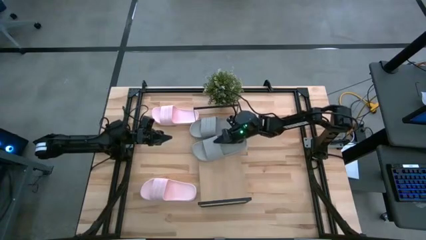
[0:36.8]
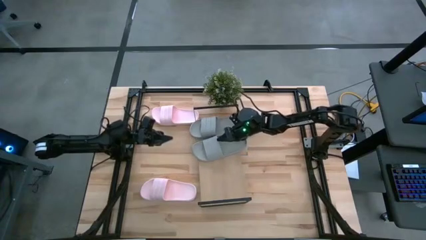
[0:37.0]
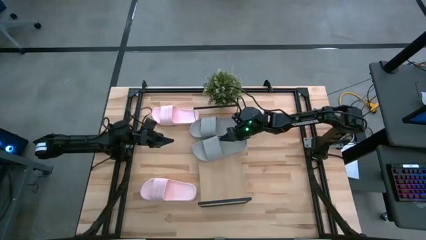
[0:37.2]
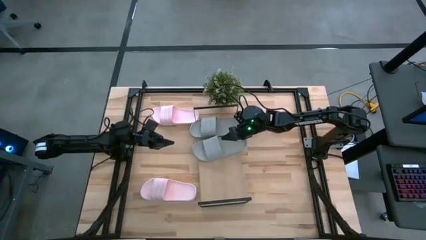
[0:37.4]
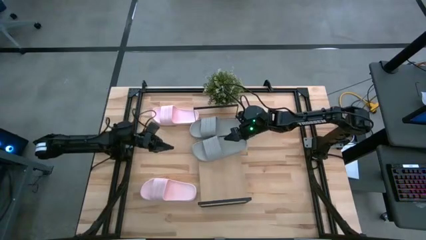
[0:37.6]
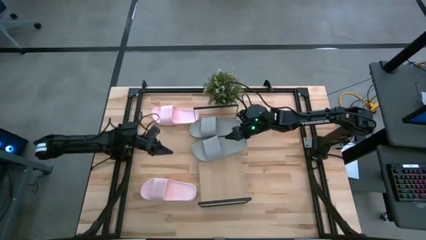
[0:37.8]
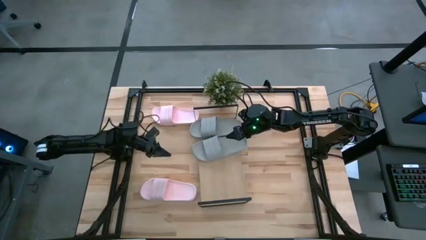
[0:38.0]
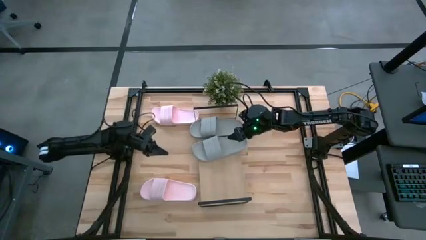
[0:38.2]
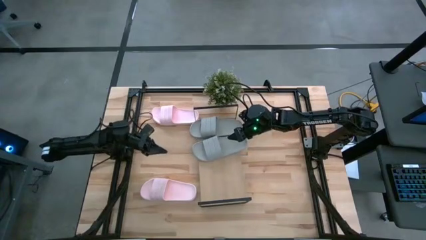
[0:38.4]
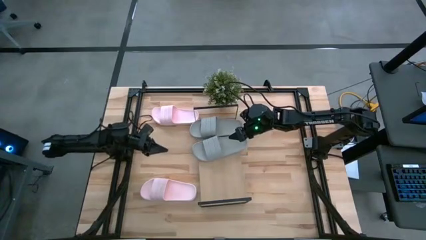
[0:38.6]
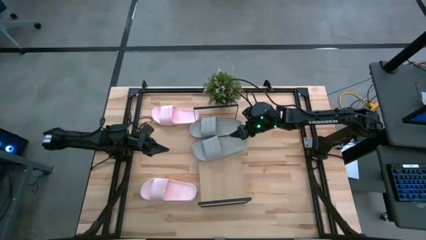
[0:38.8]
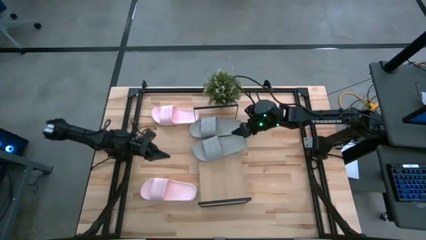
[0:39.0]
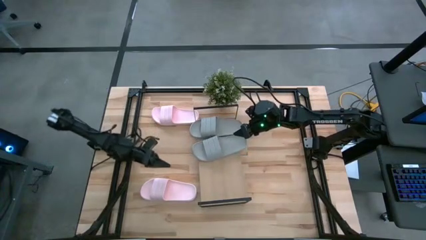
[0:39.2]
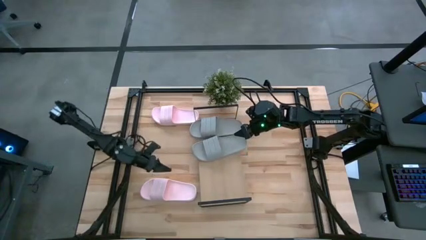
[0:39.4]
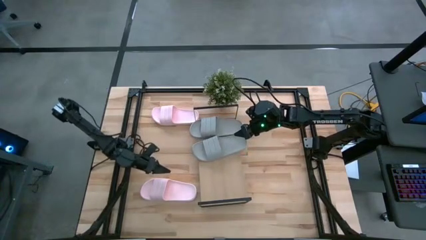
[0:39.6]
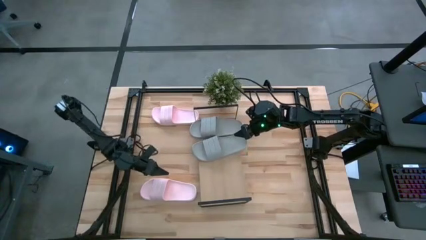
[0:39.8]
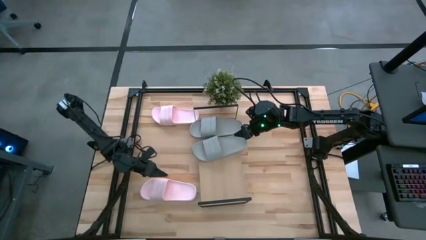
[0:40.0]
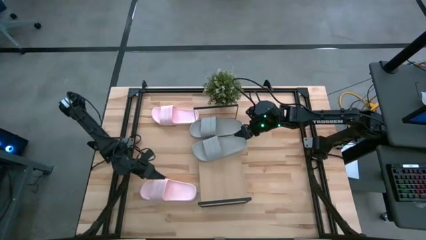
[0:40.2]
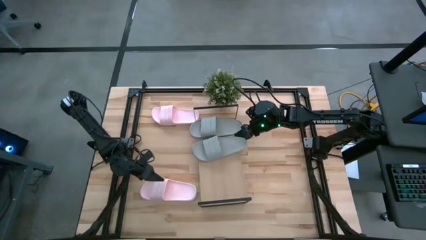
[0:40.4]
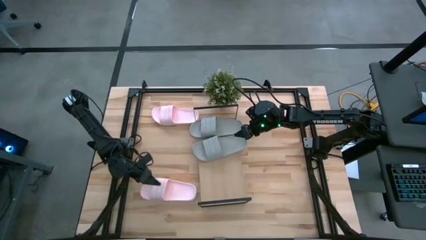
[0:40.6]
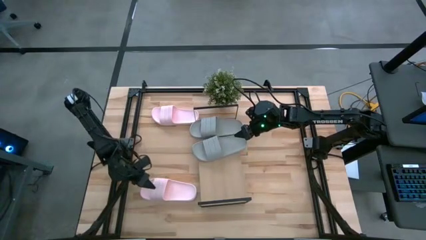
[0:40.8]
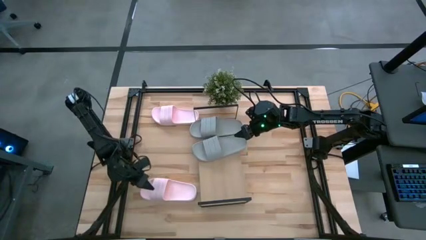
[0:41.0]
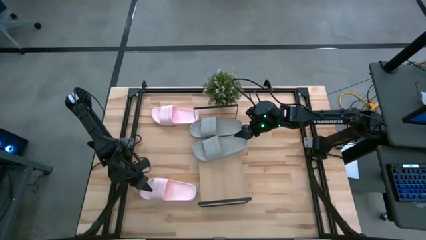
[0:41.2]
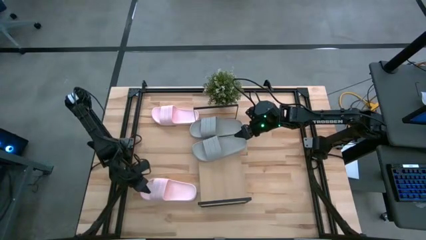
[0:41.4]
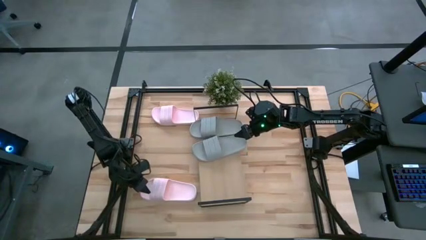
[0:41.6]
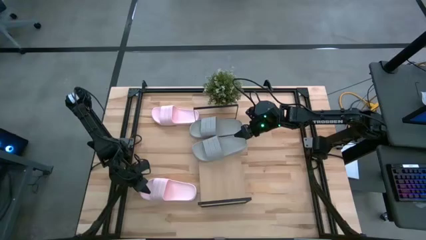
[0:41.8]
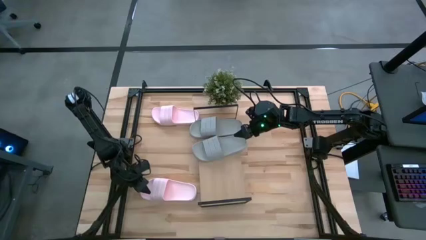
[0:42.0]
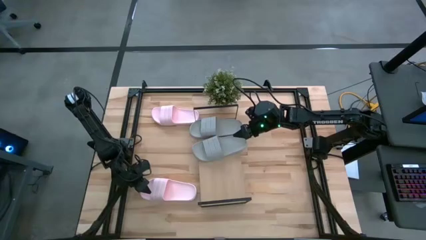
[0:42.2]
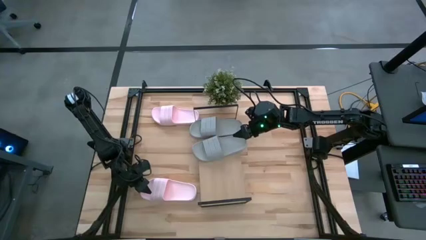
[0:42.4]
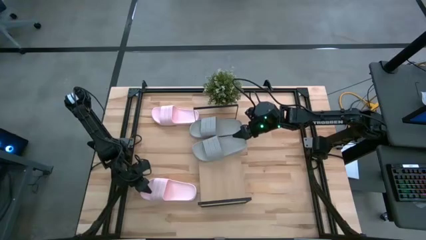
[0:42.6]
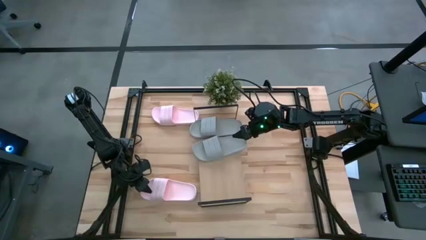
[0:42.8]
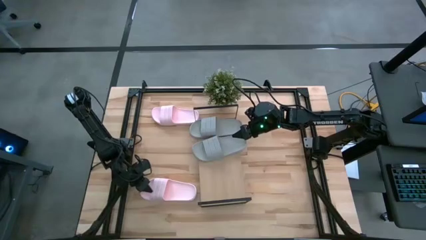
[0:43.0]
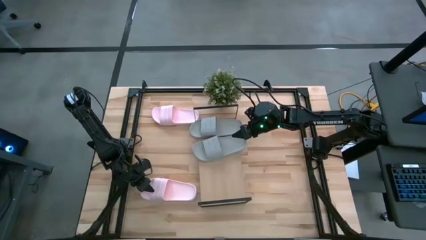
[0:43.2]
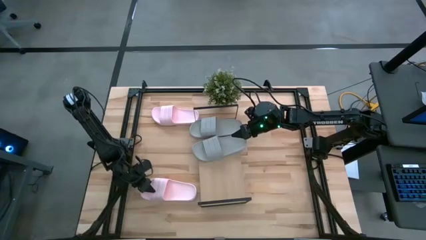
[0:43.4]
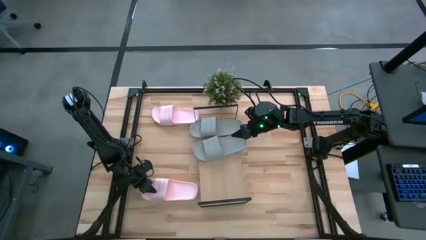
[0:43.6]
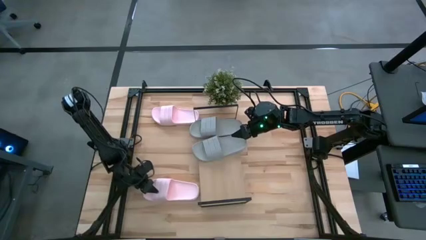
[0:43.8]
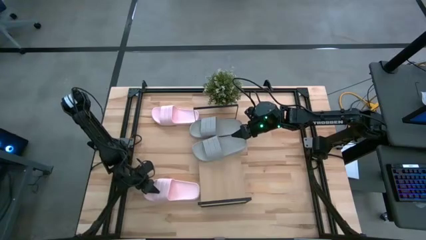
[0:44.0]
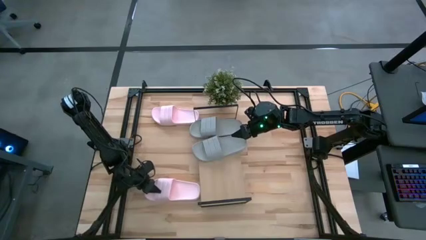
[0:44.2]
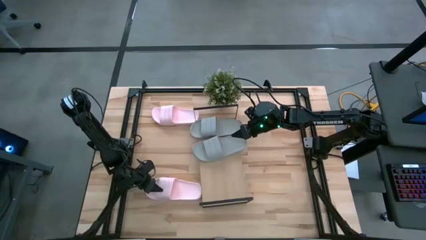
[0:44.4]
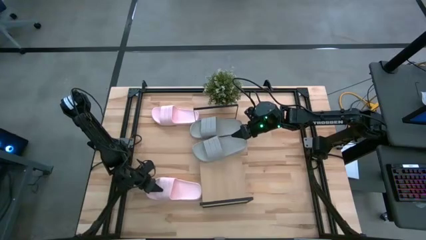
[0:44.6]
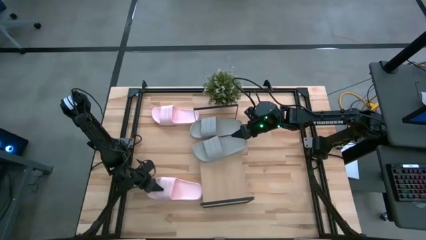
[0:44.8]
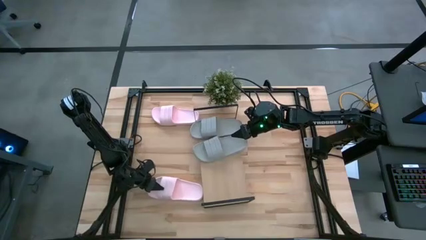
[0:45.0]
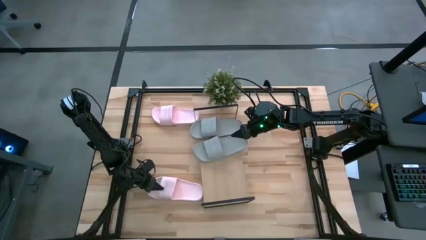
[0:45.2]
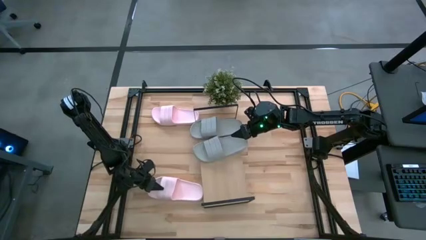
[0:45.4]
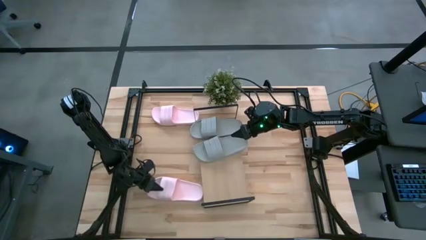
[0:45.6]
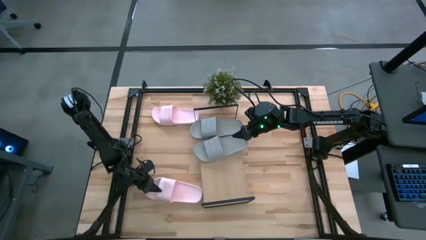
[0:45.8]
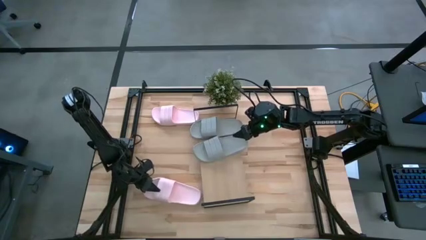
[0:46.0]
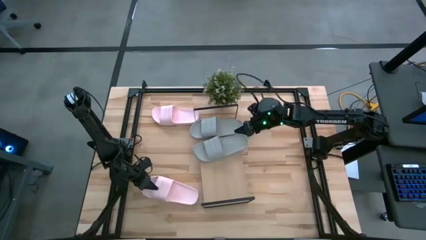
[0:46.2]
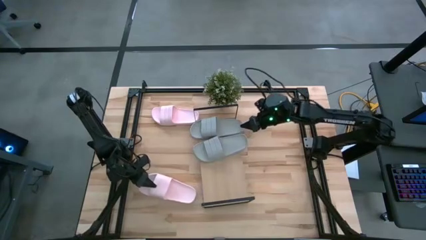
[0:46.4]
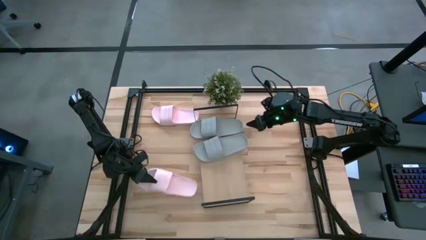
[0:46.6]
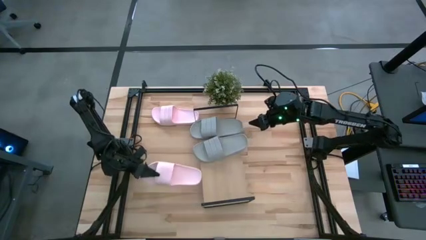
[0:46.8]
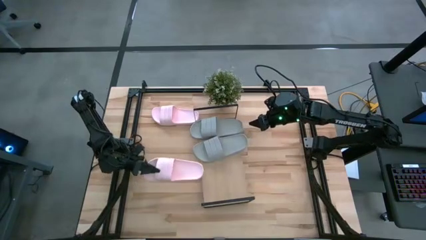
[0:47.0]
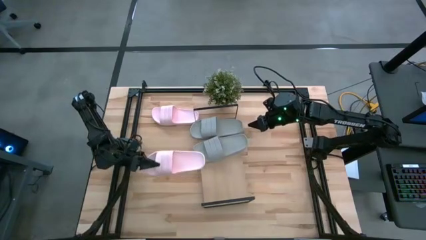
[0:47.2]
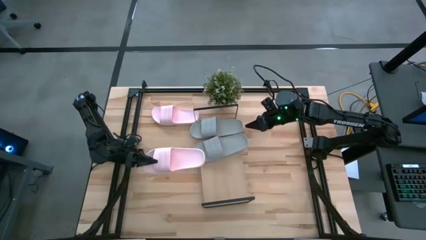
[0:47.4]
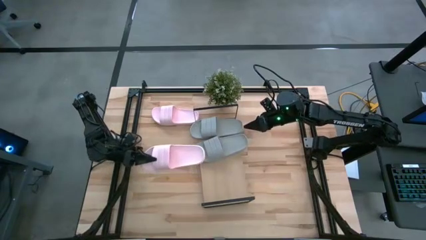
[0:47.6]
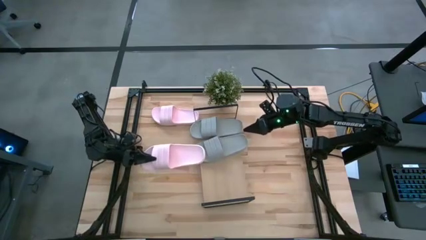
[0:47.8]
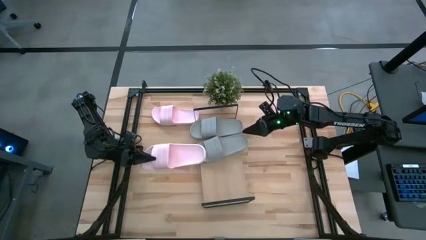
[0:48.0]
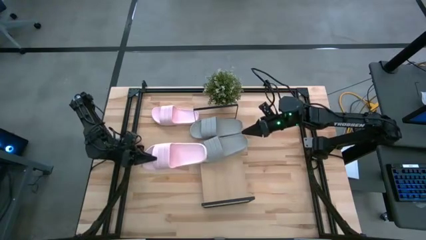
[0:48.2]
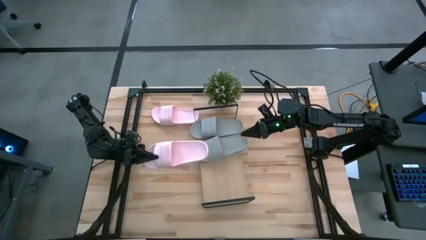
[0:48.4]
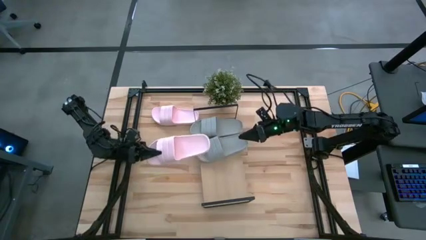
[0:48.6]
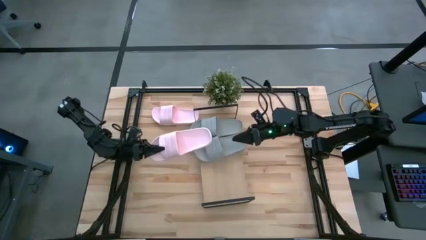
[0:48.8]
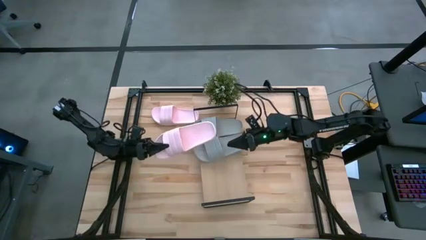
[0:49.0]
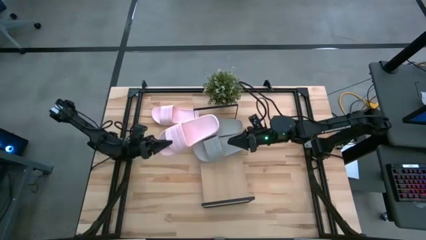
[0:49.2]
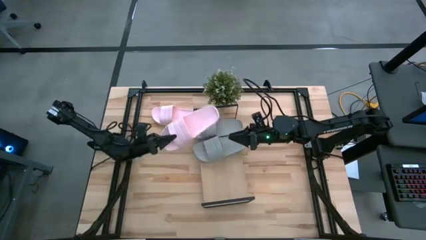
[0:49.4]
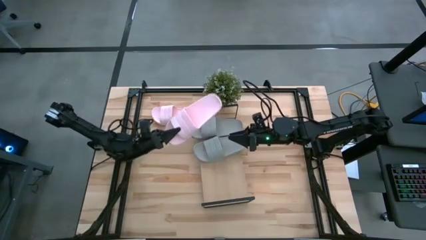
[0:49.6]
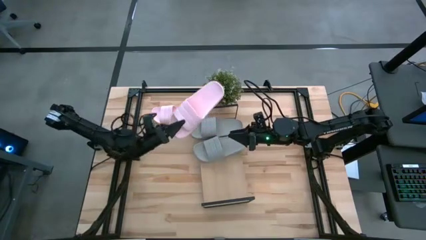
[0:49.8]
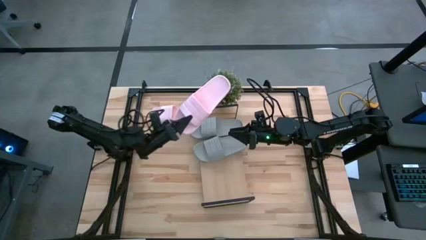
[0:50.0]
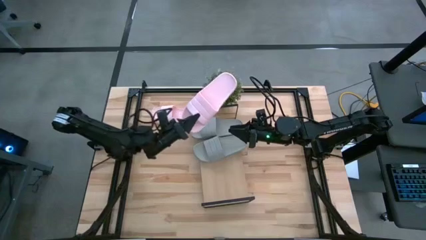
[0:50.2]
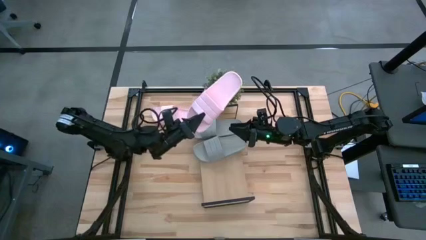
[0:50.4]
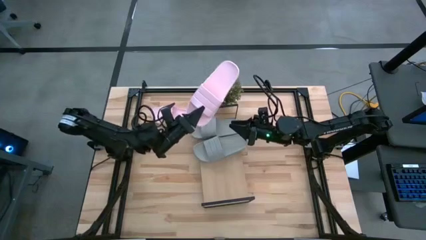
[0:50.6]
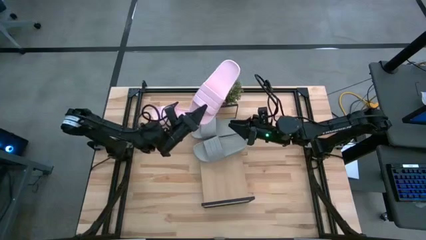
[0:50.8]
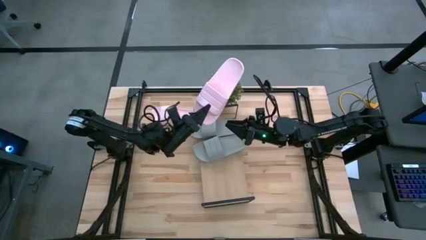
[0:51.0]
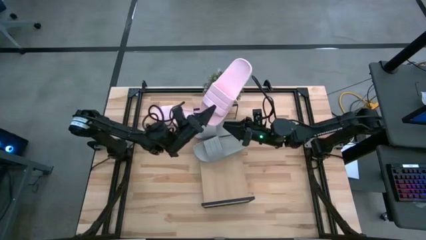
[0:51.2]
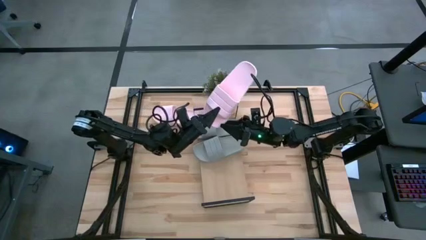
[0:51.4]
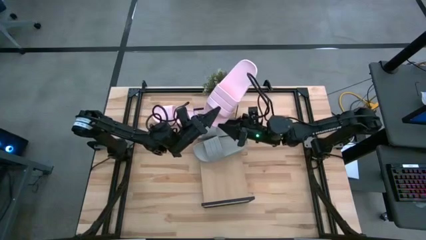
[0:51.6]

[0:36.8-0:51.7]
Task: Pick and place slides into the shelf
Put the bottom pink slide on the shelf

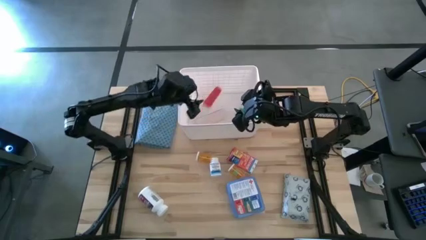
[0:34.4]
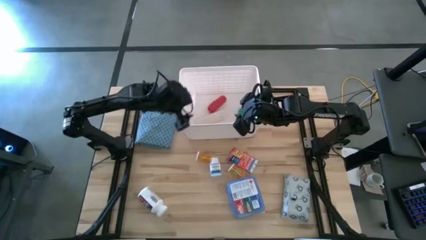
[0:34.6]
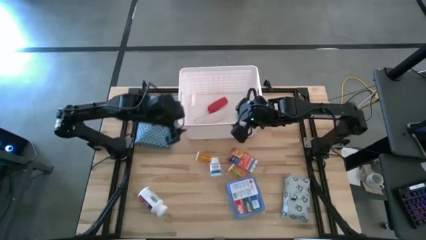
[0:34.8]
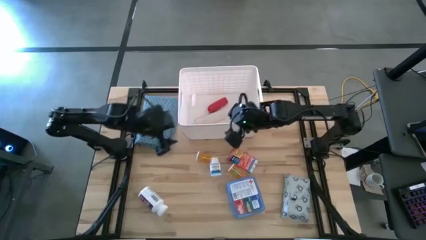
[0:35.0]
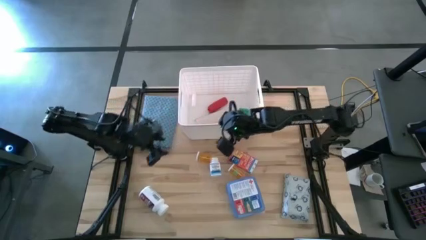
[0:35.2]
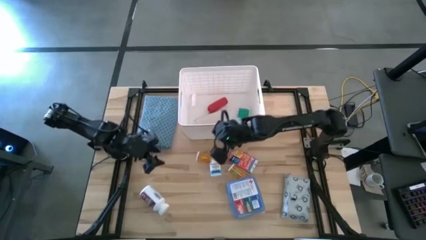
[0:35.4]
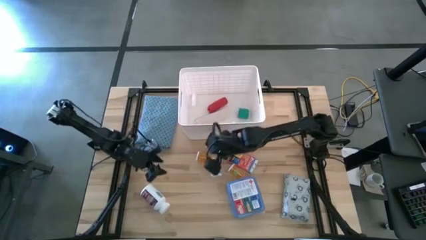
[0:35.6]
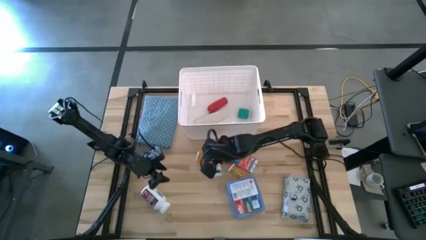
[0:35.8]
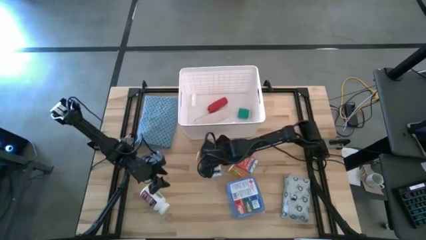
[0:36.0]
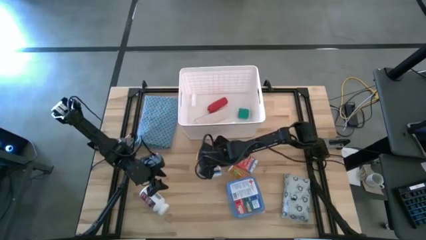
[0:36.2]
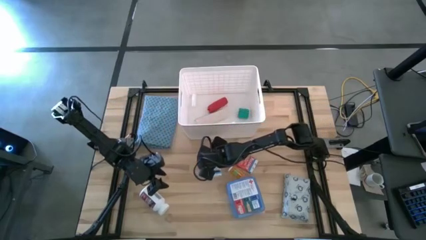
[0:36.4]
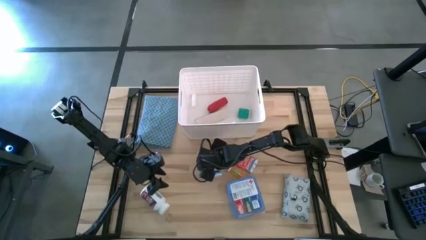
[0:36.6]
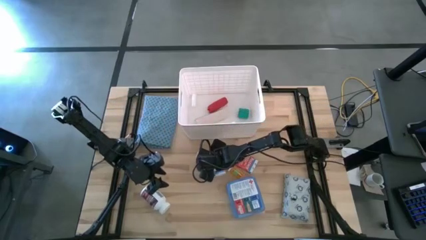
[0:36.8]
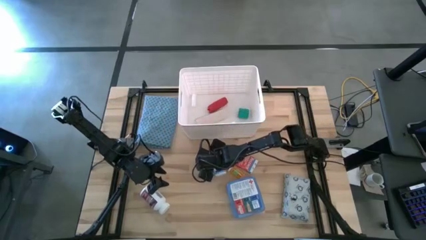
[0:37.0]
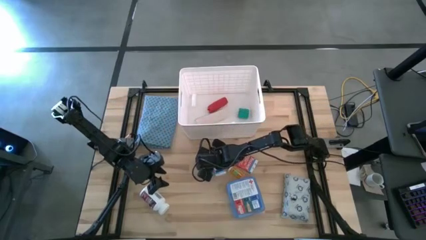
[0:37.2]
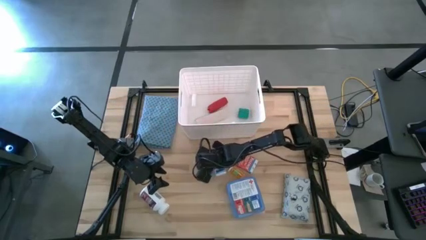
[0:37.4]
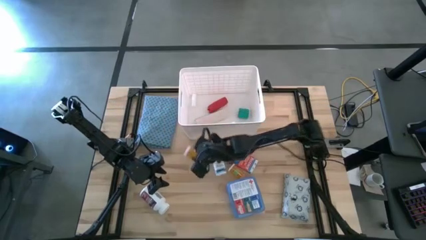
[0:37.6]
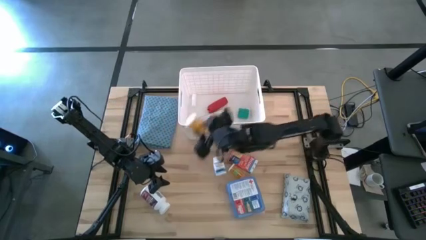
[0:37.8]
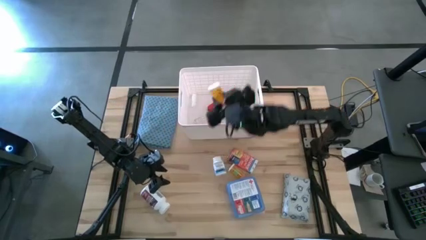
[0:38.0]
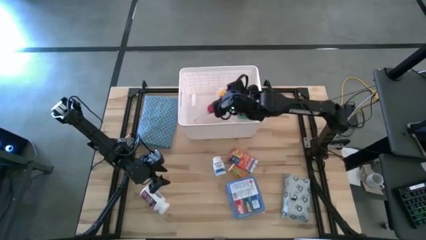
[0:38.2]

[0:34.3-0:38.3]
Task: Pick & place medical supplies in basket/bin
Put the left orange pill bottle into the white bin
